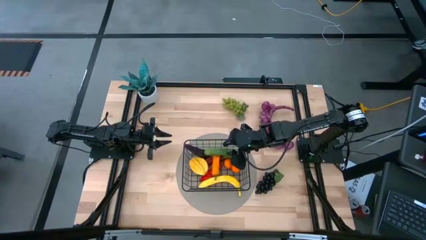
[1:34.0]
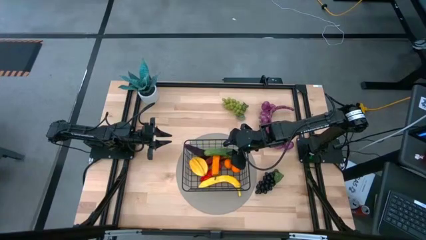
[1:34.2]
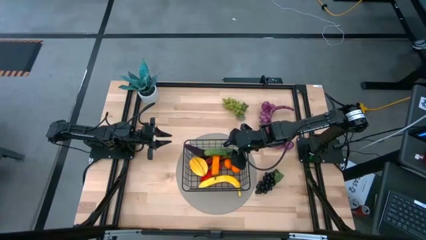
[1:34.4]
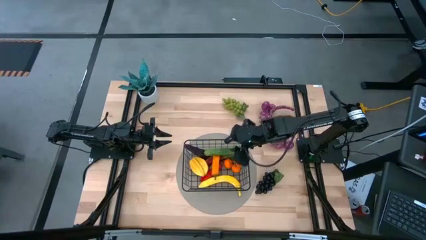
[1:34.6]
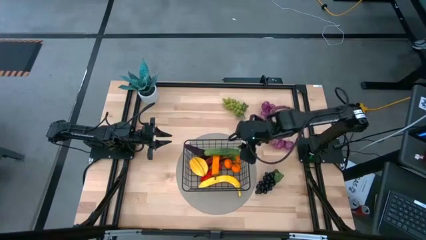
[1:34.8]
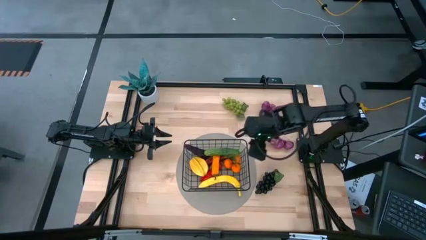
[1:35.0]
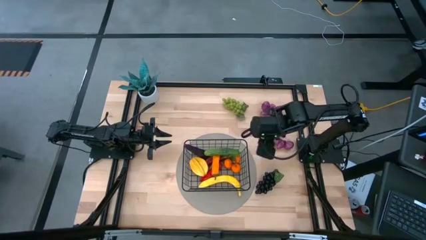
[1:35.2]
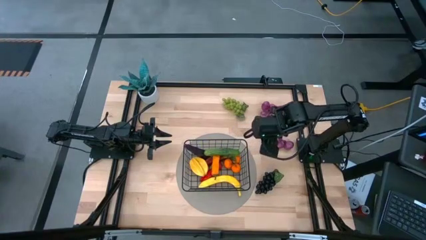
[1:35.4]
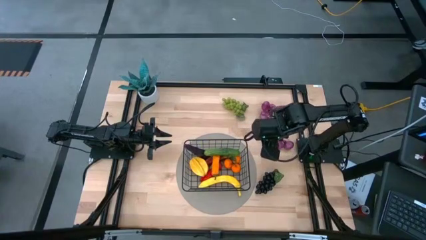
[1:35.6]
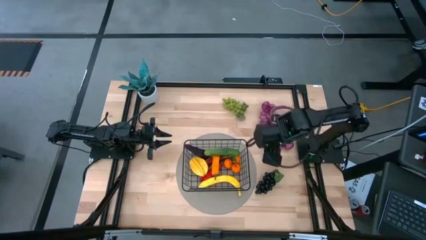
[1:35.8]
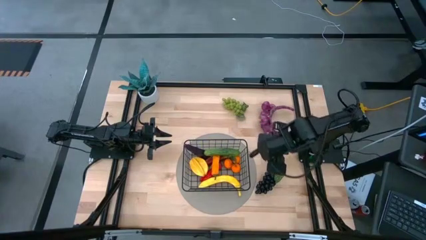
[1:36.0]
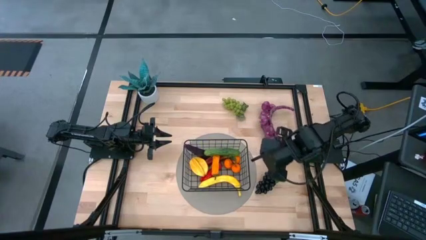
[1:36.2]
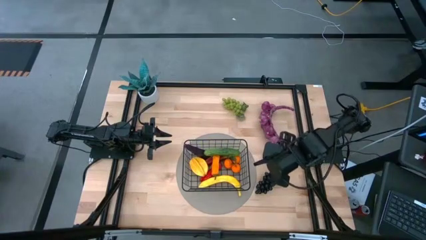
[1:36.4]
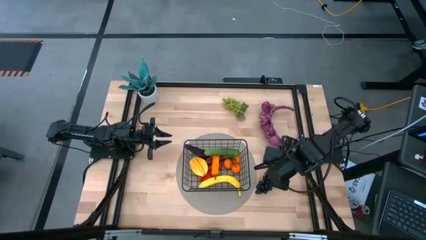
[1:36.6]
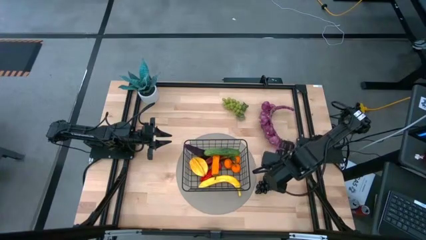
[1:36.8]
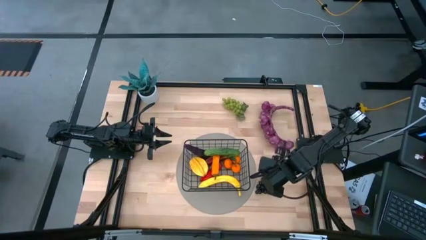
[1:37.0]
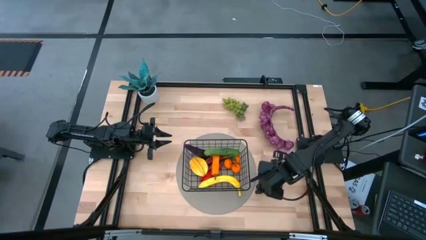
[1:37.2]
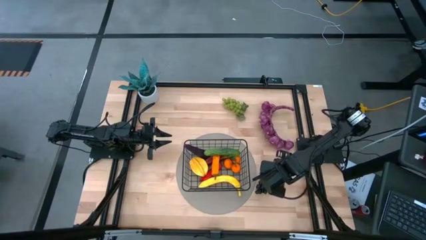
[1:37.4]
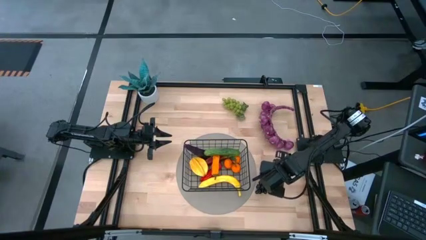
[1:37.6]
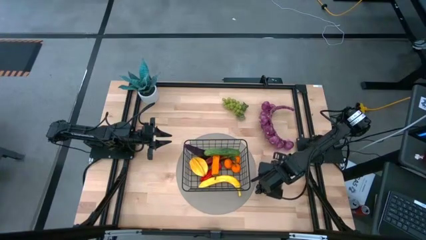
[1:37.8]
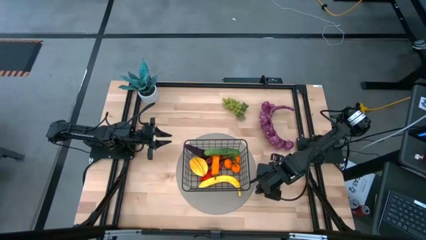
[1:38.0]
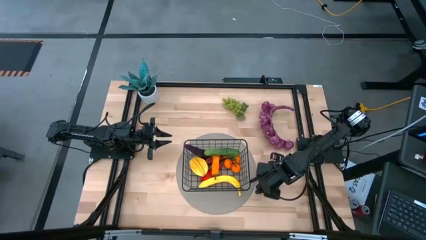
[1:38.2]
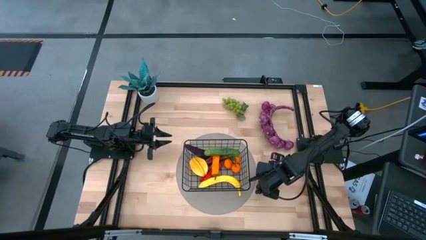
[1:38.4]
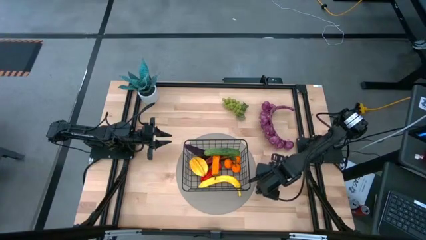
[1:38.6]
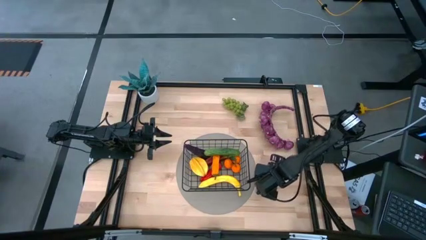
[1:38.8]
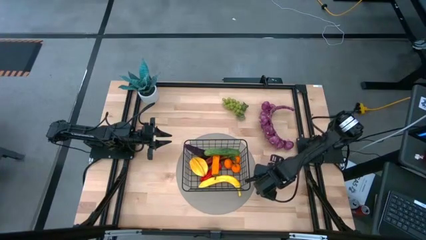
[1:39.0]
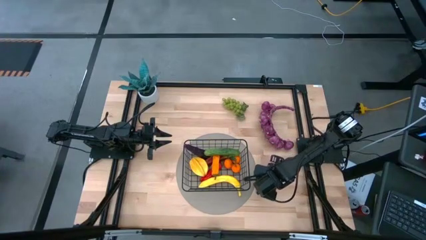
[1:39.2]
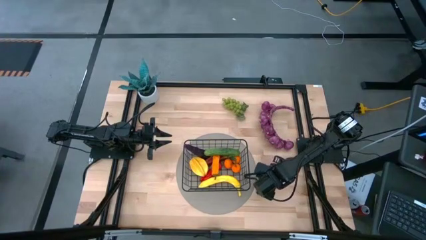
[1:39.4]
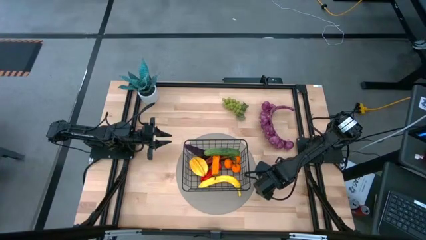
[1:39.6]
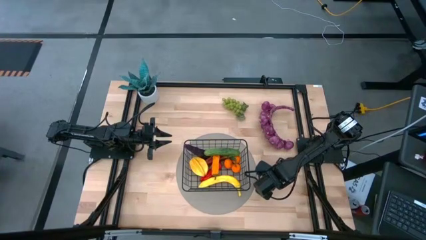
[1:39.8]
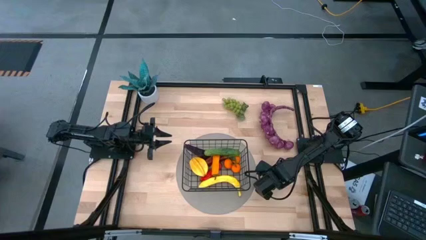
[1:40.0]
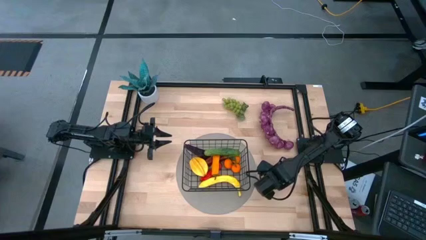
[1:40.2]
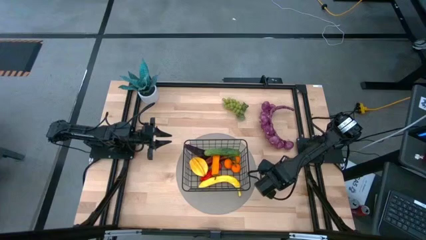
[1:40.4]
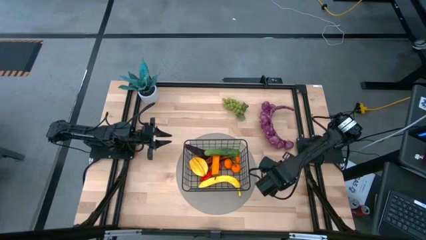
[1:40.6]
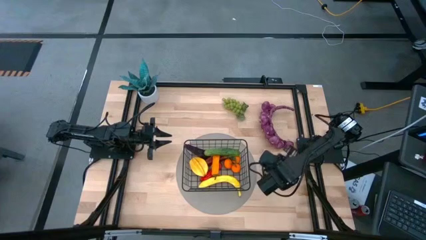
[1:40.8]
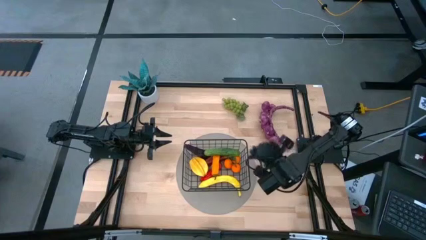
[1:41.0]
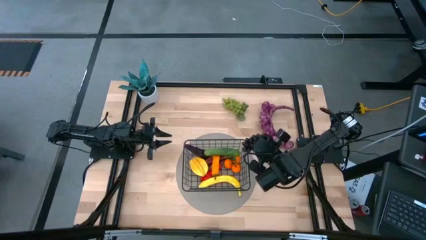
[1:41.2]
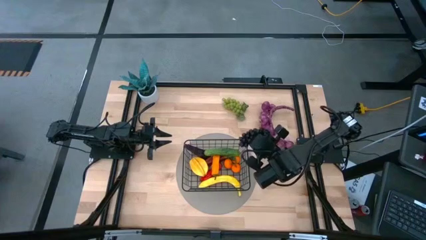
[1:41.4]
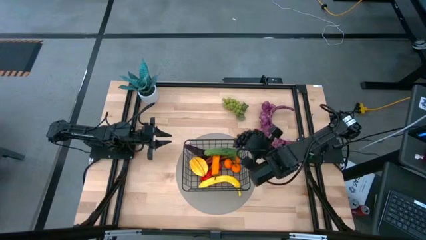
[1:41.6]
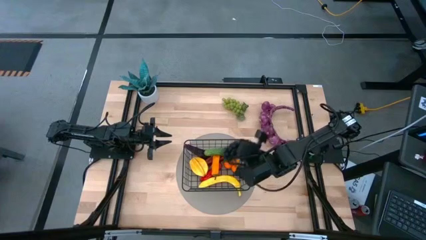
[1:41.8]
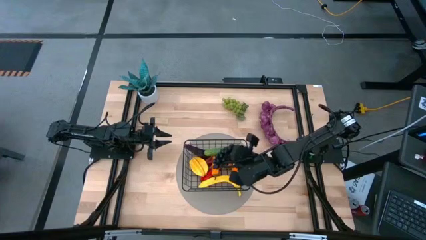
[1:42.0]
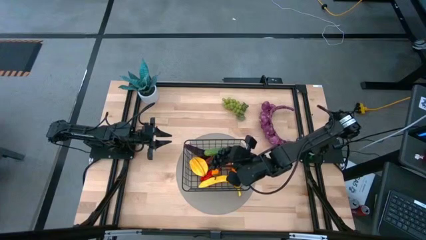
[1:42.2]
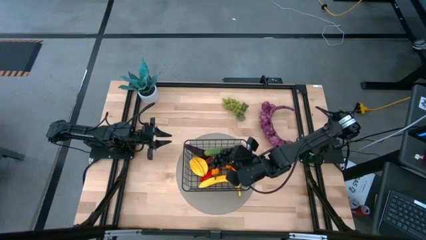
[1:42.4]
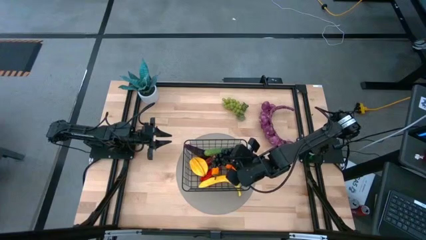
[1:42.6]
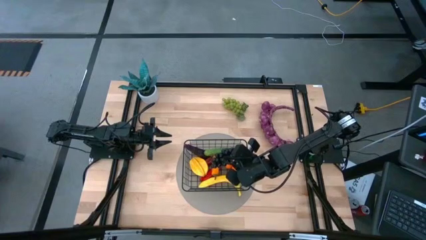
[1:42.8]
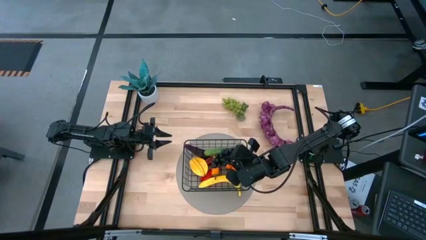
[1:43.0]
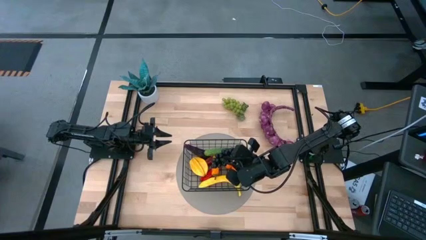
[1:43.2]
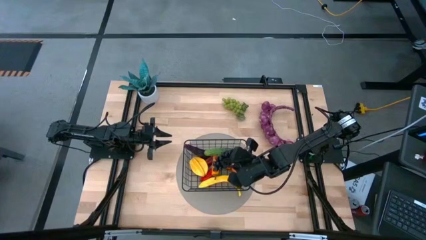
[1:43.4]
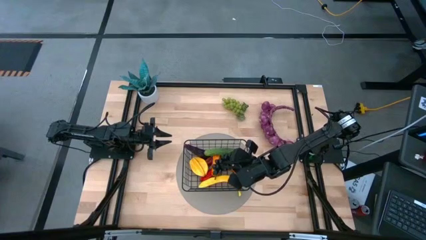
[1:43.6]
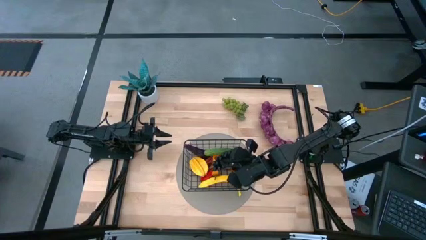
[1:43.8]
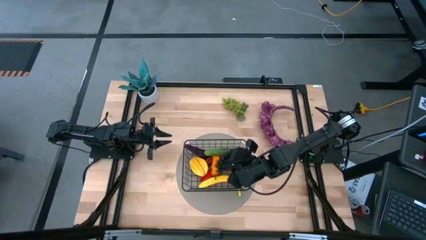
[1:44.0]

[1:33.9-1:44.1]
Task: Build produce basket
Put the black grapes into the black wire basket

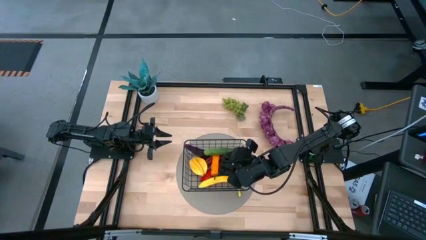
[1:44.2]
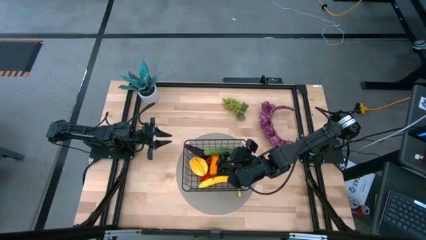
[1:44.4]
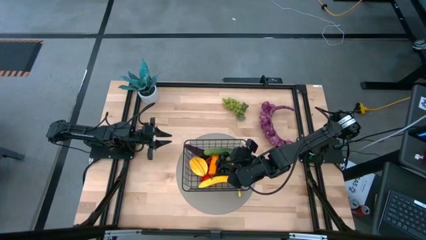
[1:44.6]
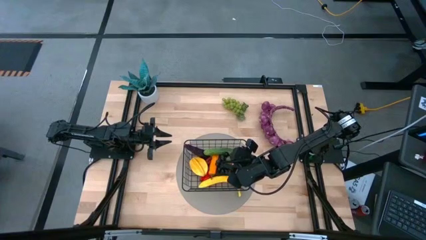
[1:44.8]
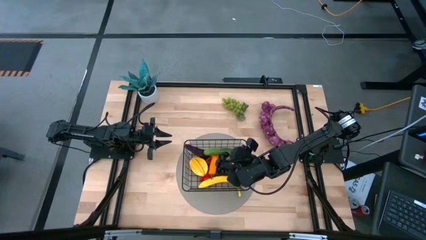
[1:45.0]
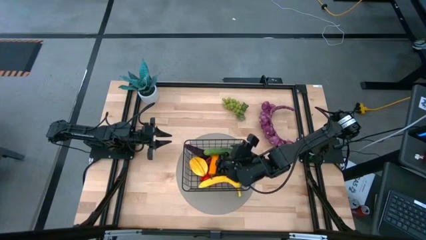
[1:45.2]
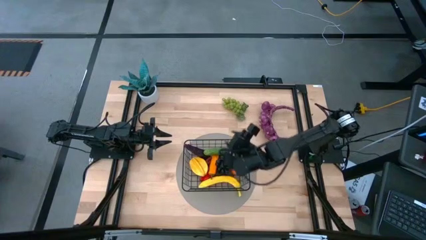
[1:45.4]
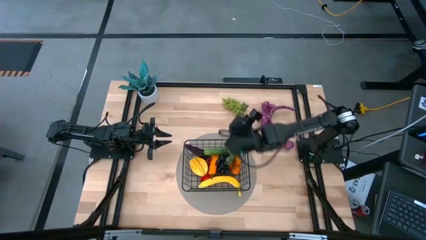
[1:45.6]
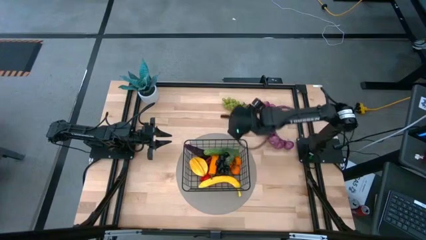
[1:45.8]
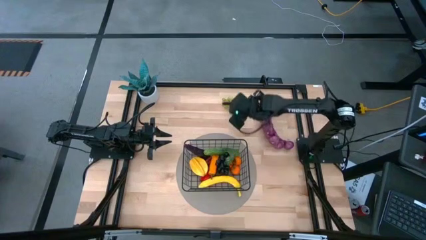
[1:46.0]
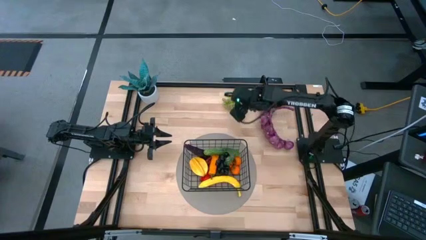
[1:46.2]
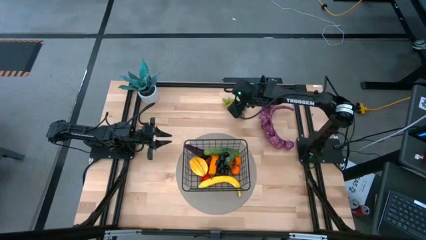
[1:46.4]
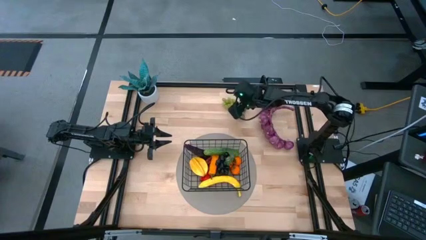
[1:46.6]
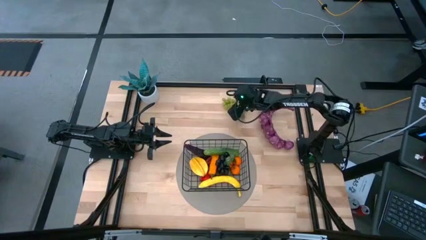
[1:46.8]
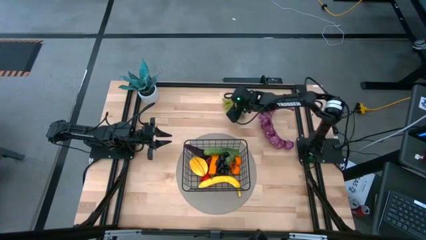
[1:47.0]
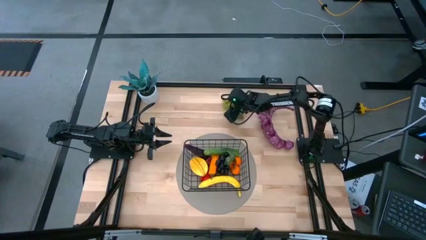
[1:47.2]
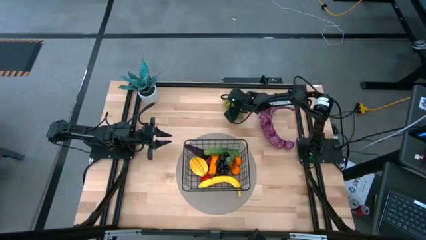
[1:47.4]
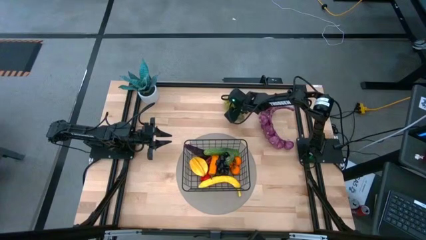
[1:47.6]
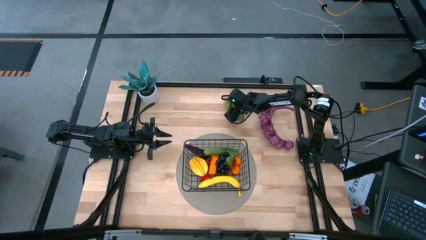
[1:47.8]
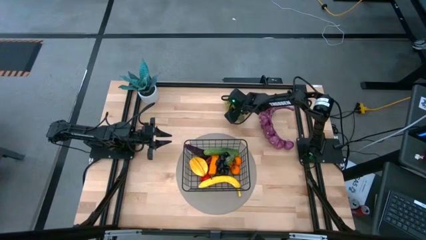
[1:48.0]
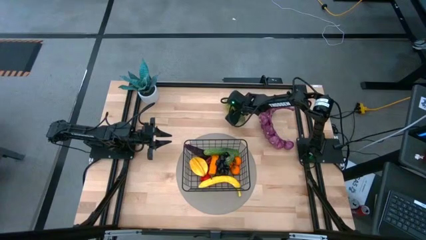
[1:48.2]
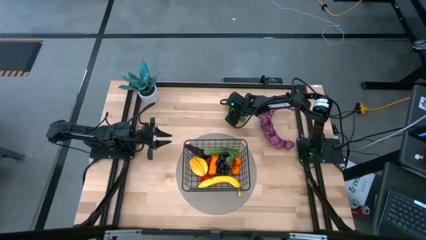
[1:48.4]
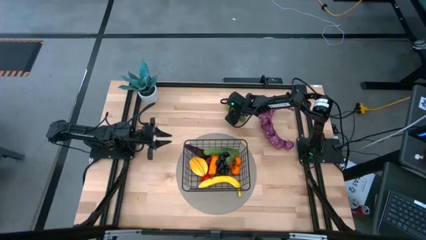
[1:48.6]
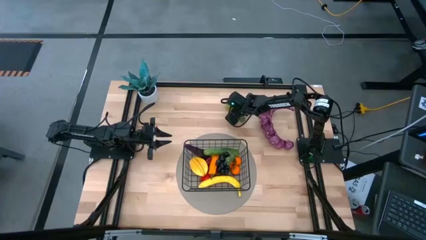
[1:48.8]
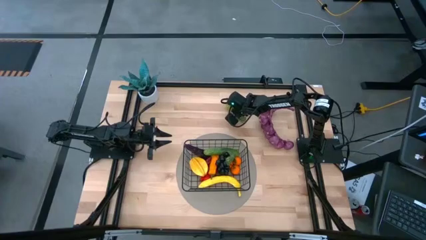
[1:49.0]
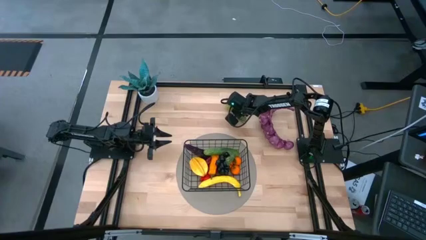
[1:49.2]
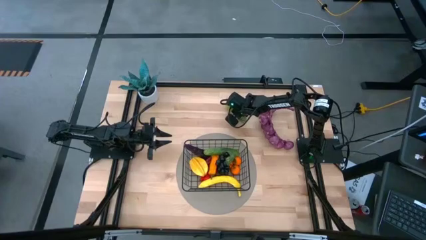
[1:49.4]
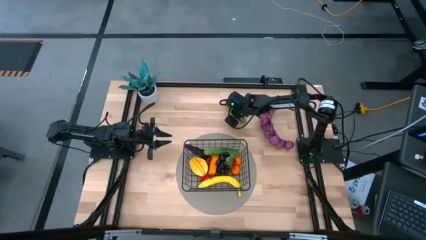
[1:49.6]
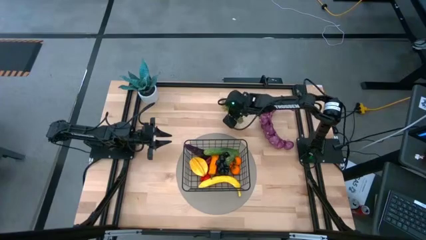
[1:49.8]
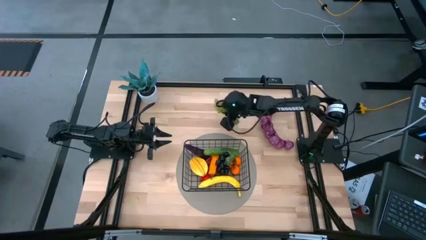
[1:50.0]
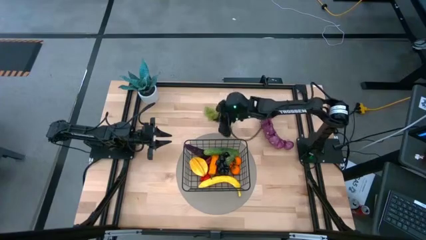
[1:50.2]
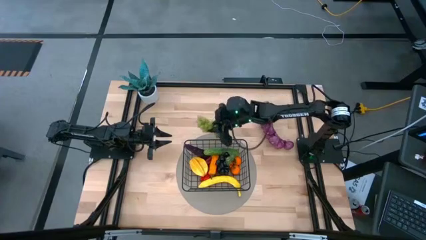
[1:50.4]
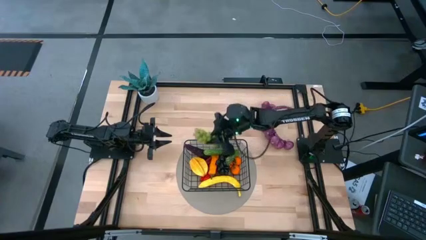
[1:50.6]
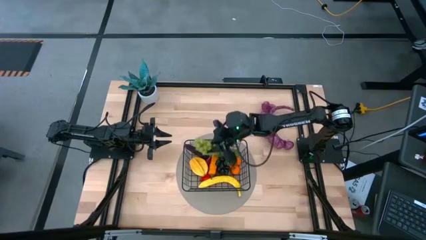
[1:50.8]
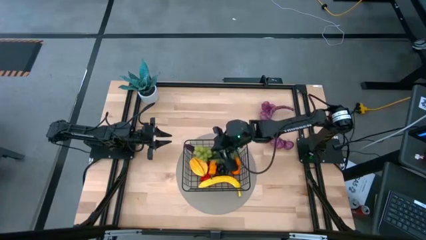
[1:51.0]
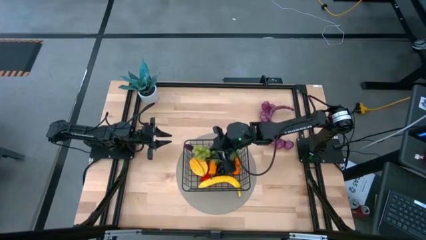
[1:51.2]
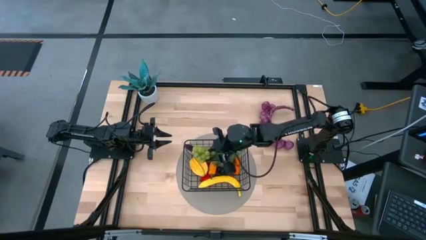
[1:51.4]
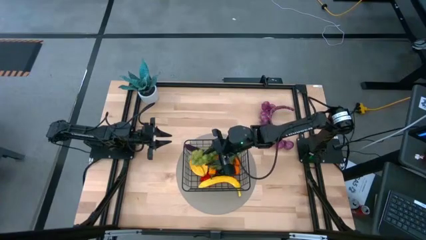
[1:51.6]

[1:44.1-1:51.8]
Put the green grapes into the black wire basket
